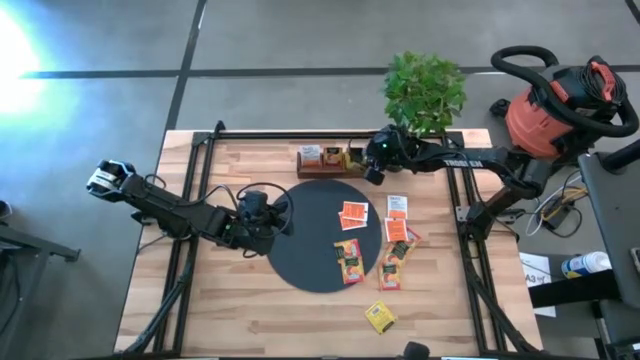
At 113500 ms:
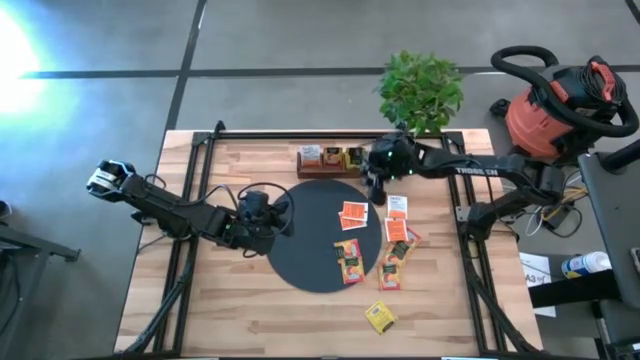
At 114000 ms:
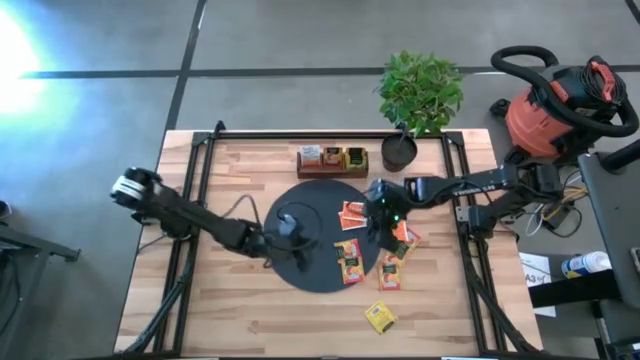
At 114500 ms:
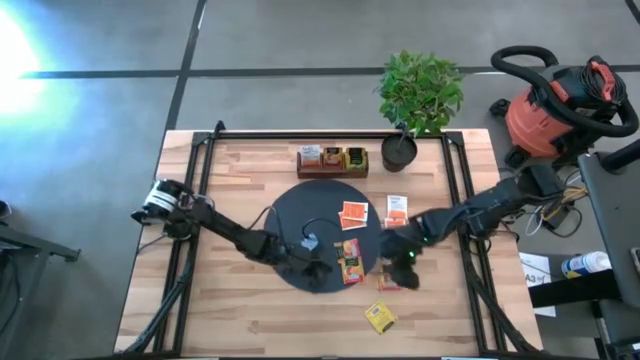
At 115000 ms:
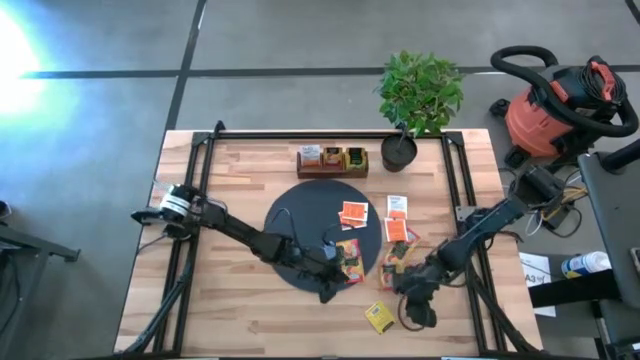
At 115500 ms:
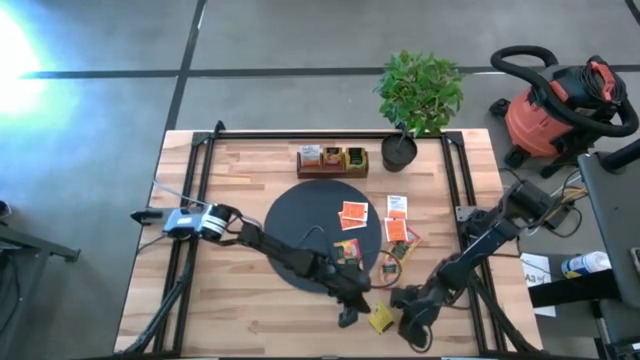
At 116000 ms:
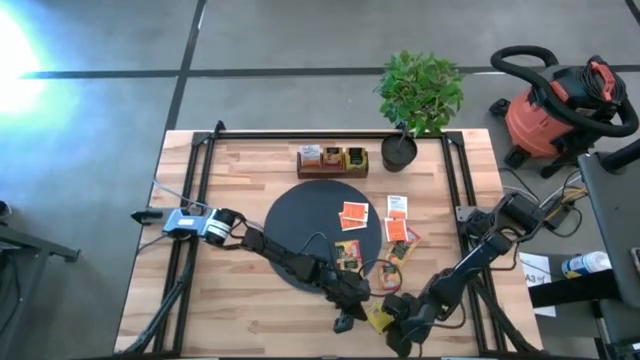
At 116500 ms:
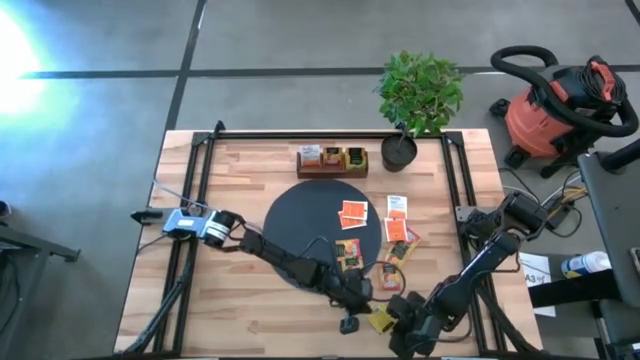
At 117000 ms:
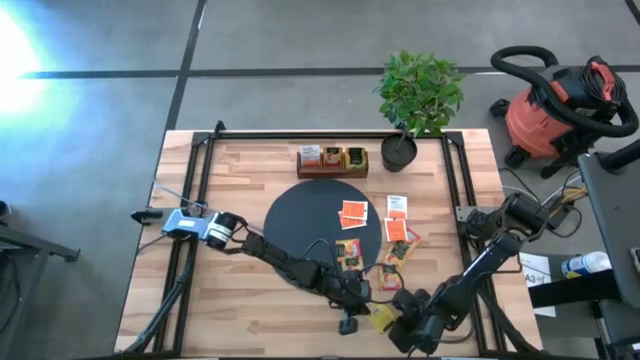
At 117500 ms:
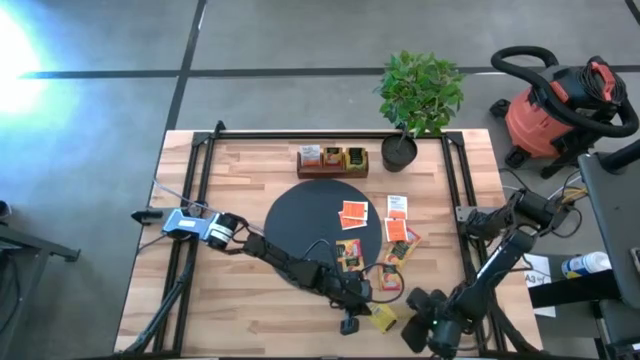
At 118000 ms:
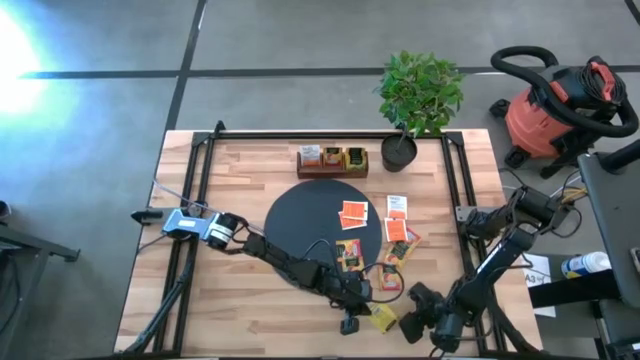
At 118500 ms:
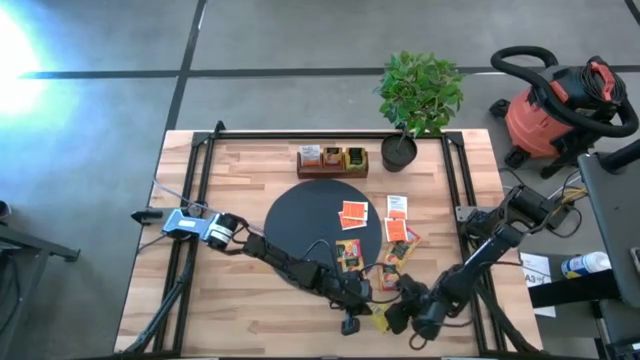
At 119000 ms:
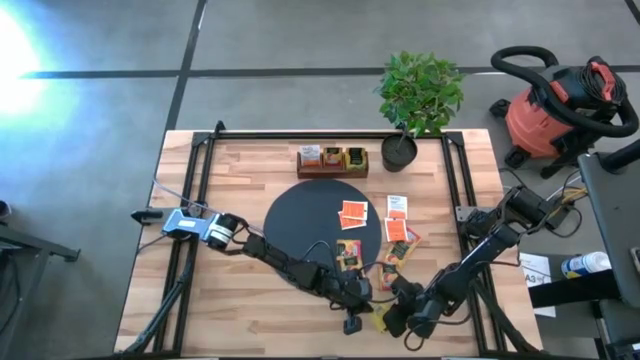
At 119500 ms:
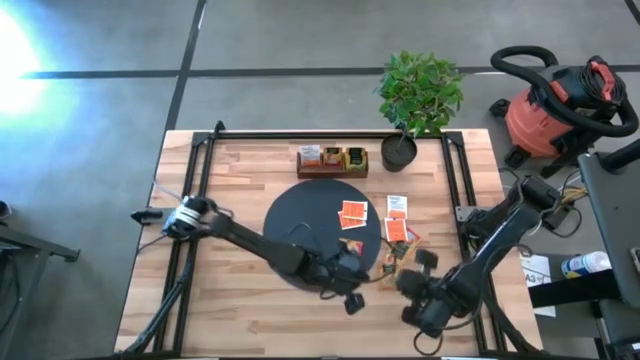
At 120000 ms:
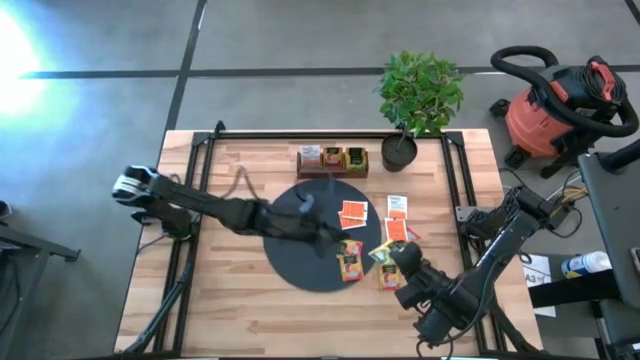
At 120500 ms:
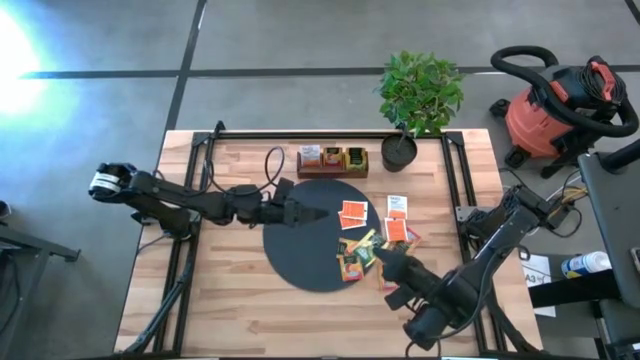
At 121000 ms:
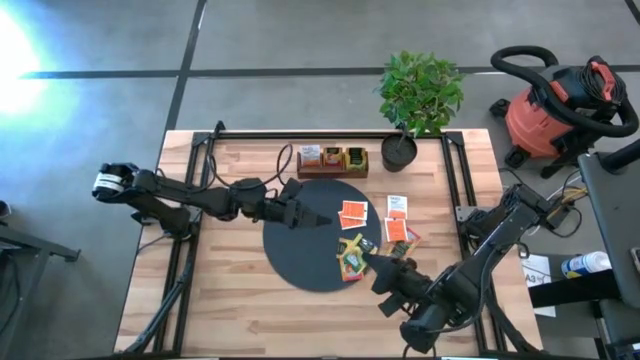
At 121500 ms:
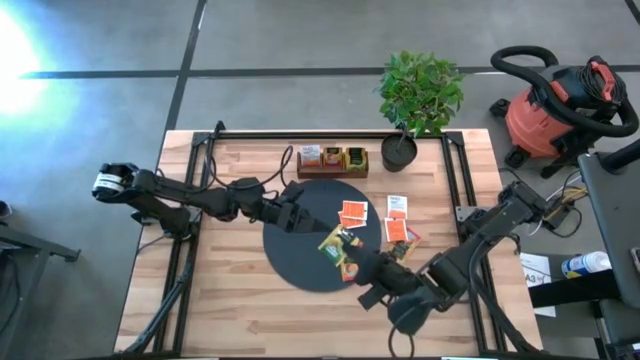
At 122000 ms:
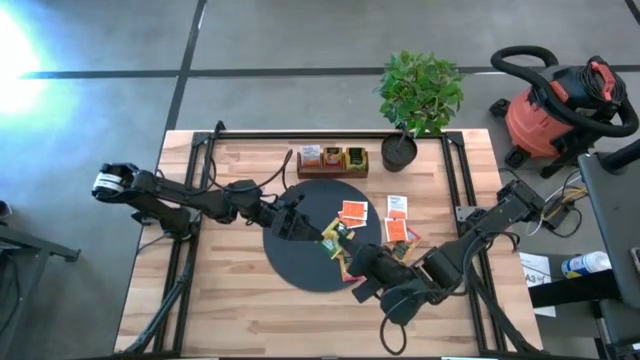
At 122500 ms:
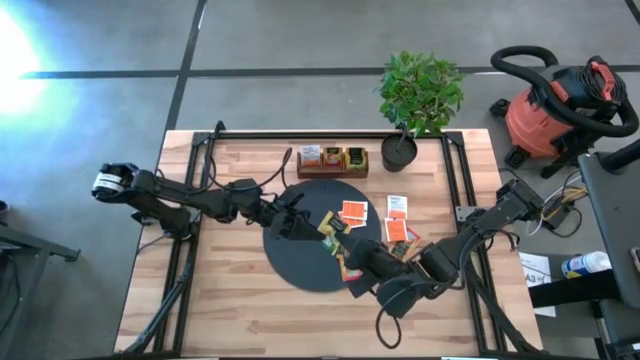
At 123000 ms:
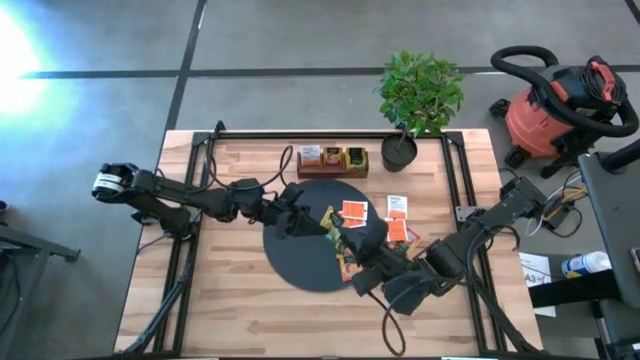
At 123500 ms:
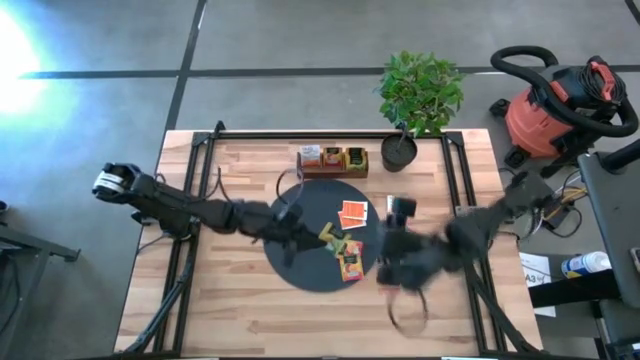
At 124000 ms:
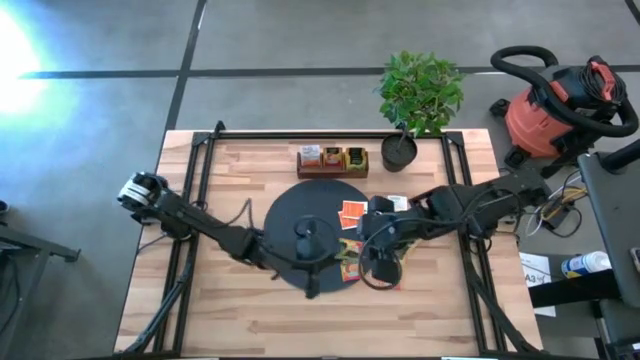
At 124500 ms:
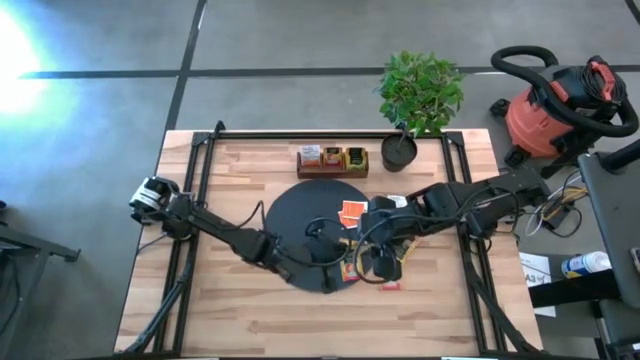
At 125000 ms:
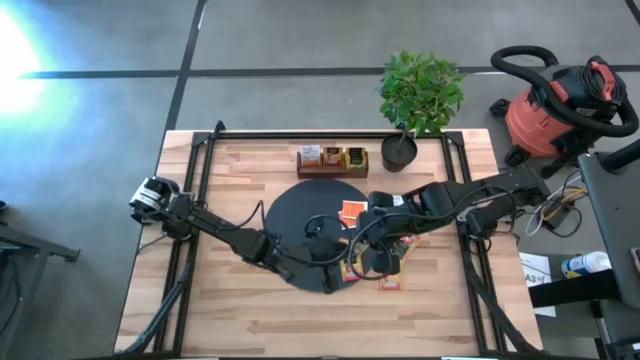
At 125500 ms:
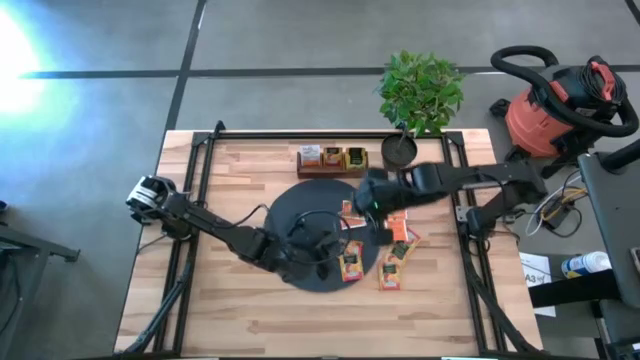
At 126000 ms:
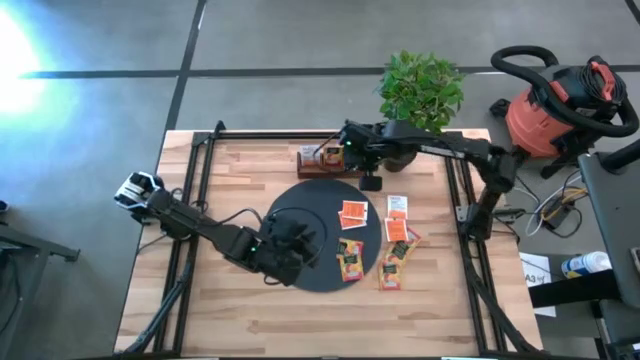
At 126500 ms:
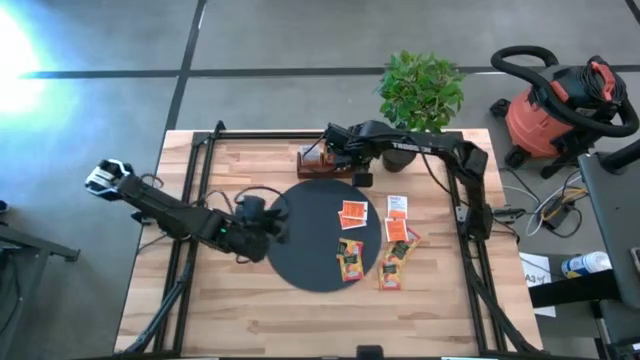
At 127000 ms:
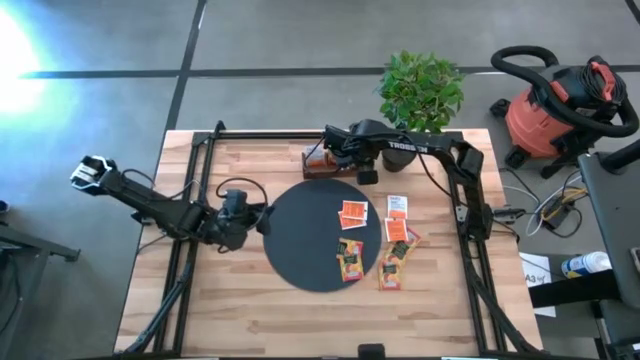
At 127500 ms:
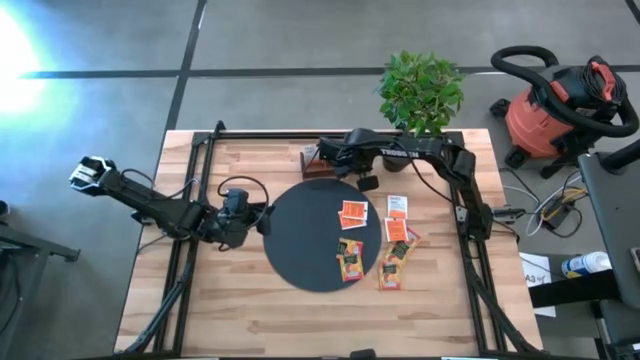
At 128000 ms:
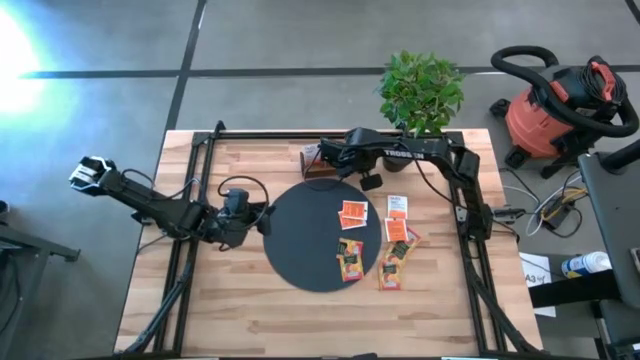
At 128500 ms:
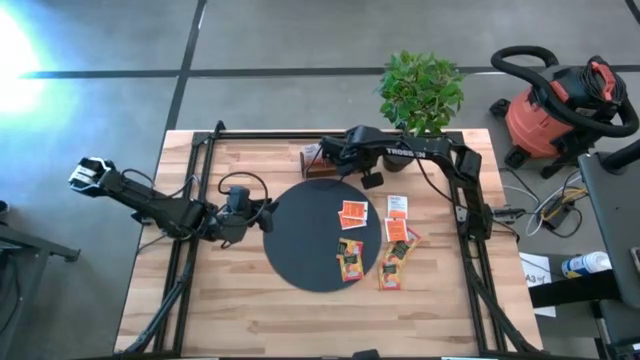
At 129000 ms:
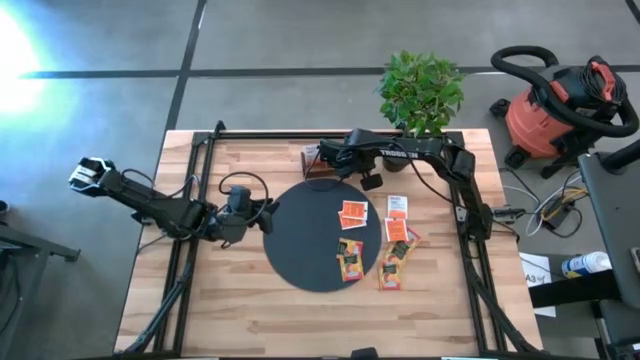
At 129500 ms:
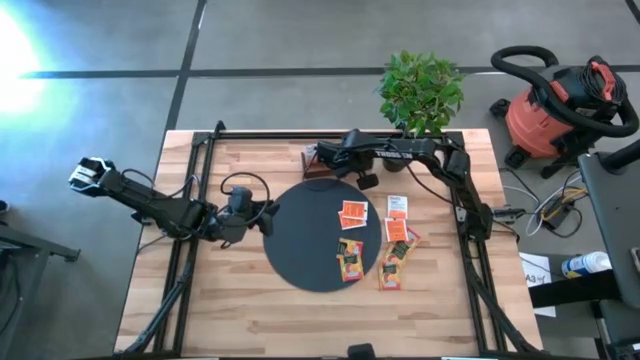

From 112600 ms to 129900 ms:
Task: Pick & Place Tea
Put the yellow tea bag into the right section of the brown wooden organizer
